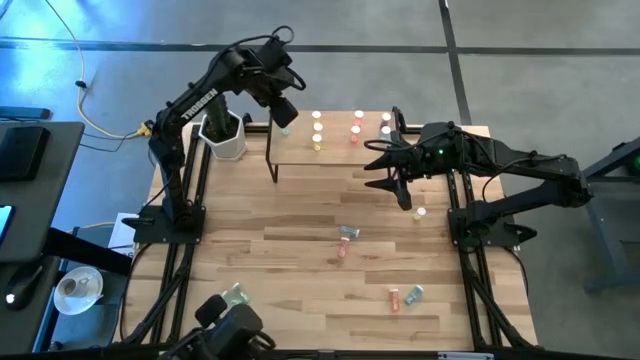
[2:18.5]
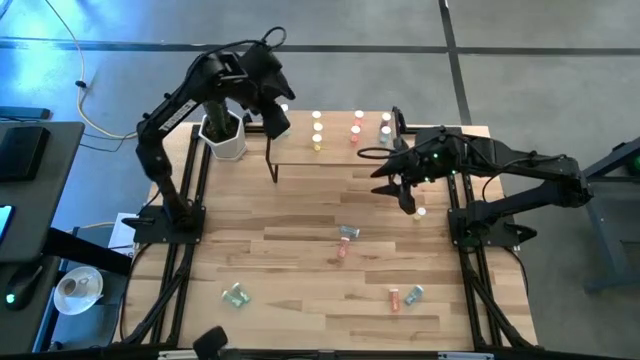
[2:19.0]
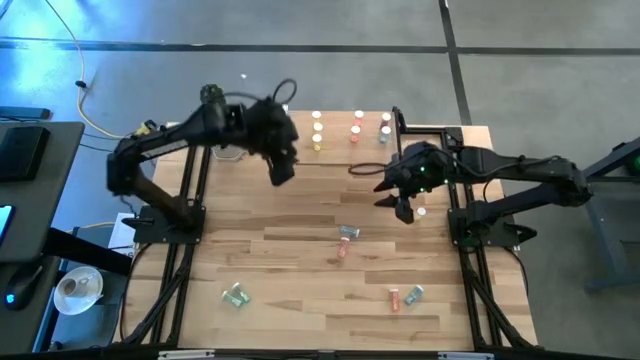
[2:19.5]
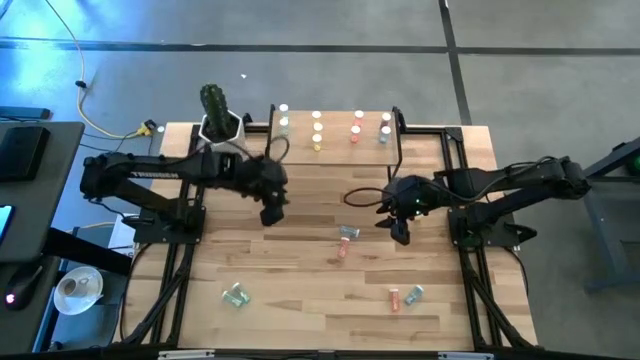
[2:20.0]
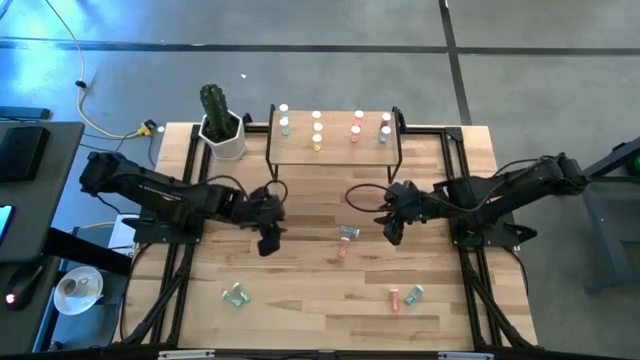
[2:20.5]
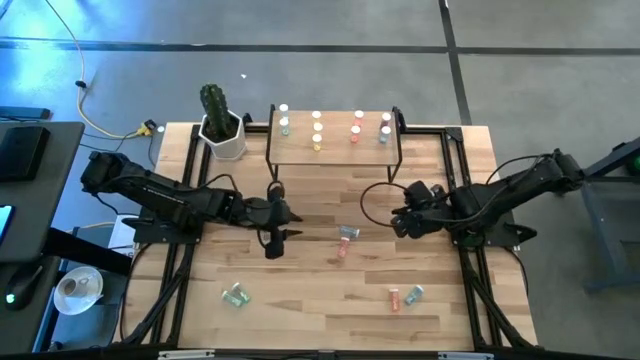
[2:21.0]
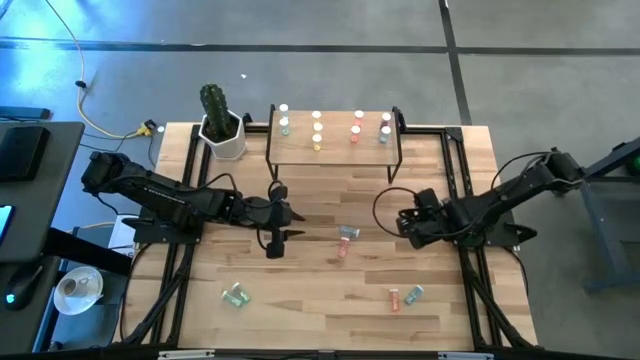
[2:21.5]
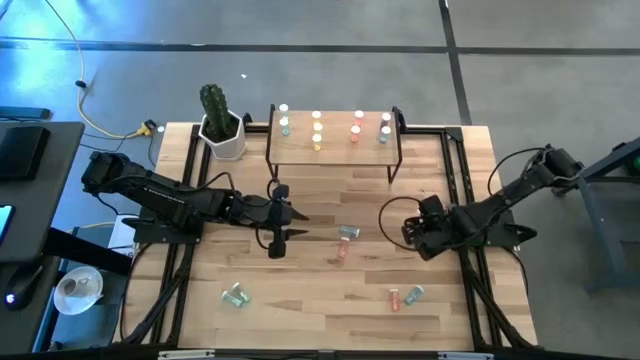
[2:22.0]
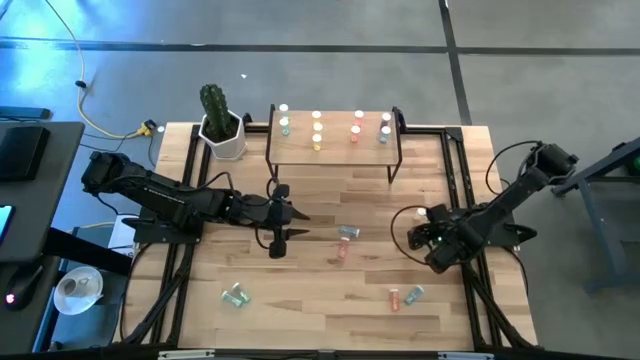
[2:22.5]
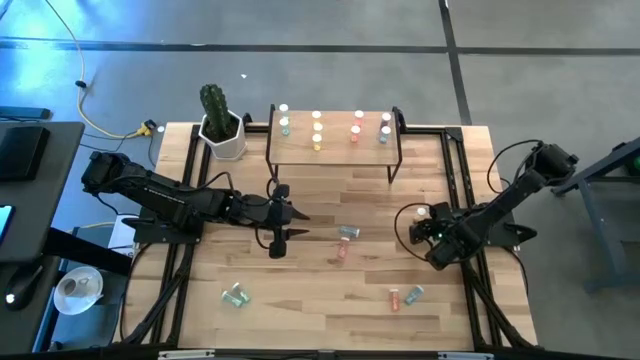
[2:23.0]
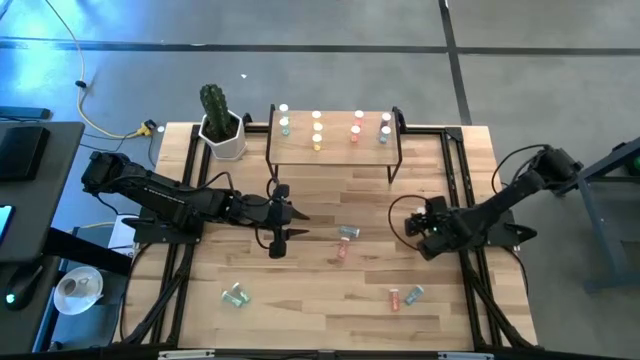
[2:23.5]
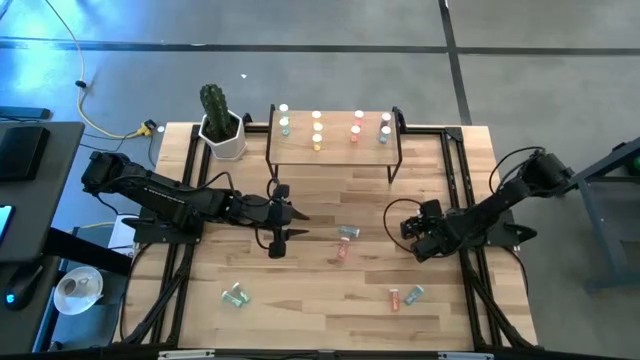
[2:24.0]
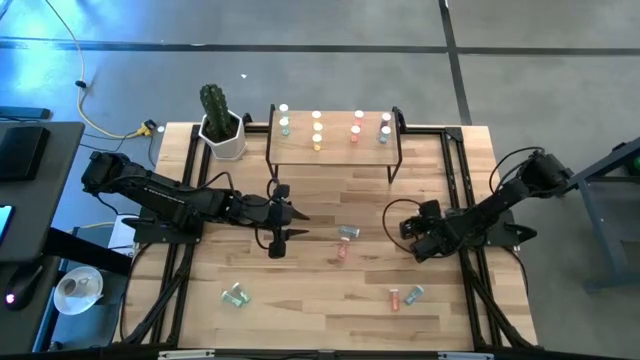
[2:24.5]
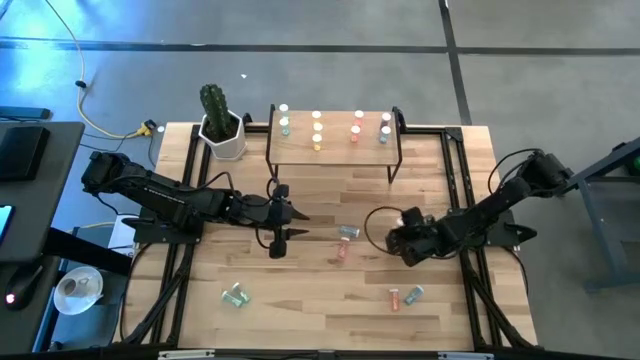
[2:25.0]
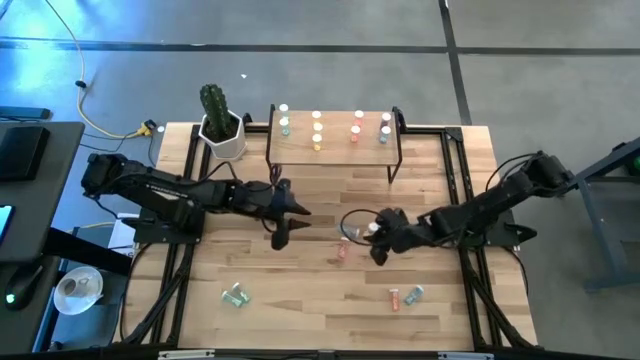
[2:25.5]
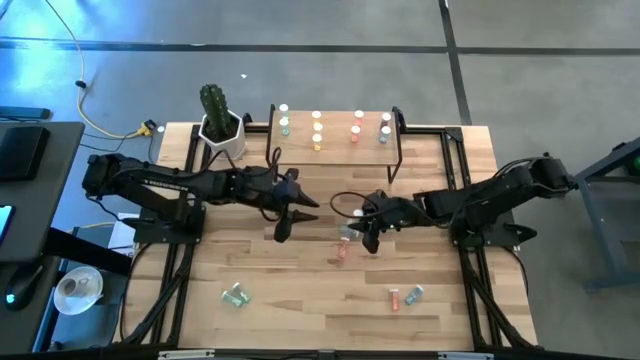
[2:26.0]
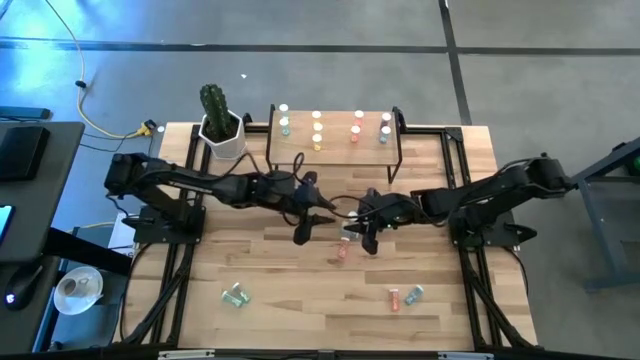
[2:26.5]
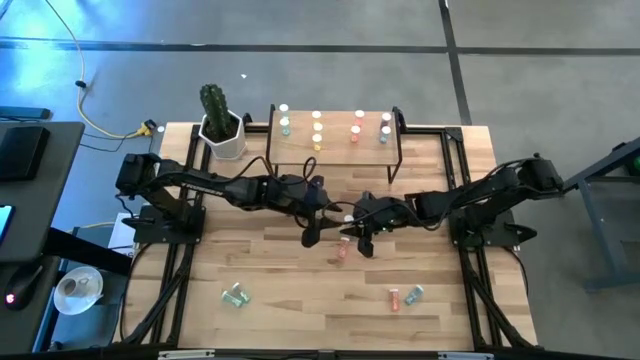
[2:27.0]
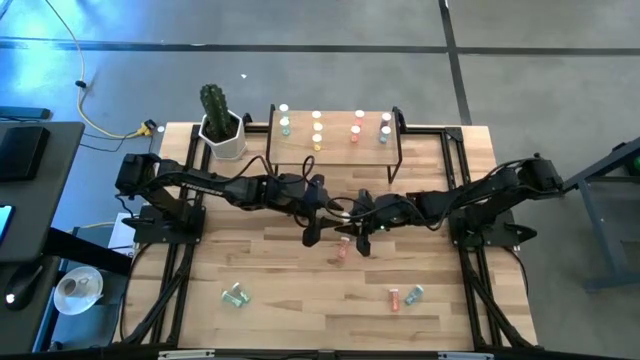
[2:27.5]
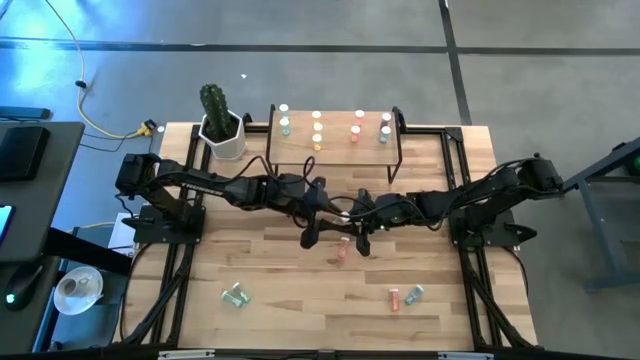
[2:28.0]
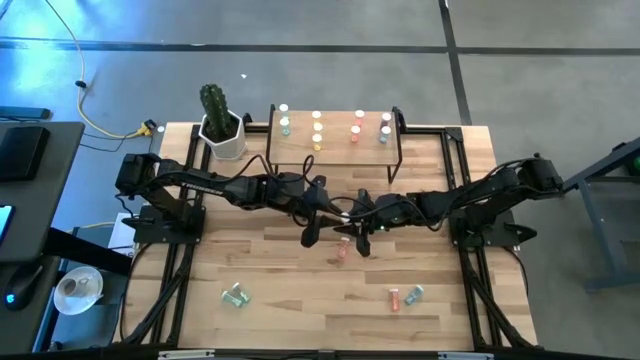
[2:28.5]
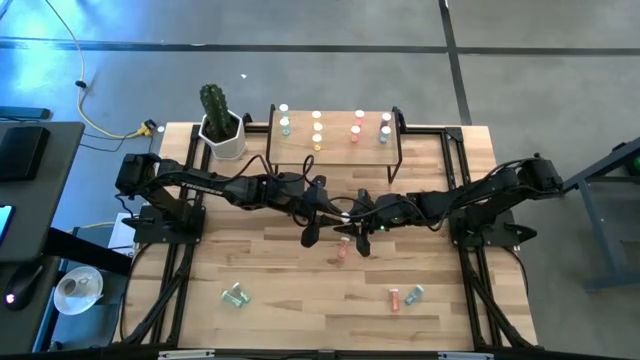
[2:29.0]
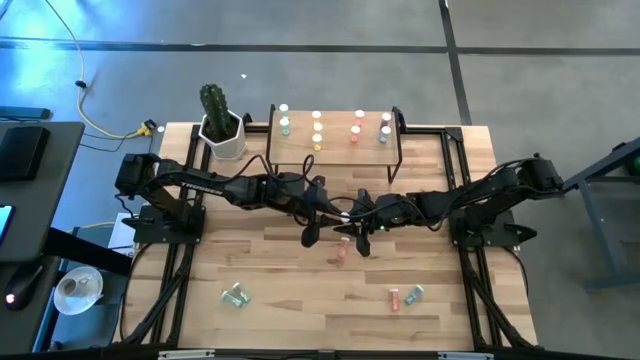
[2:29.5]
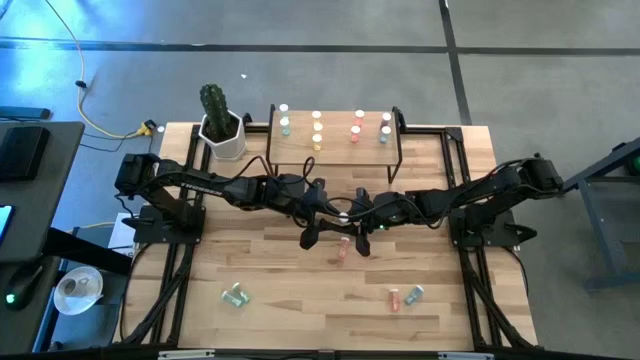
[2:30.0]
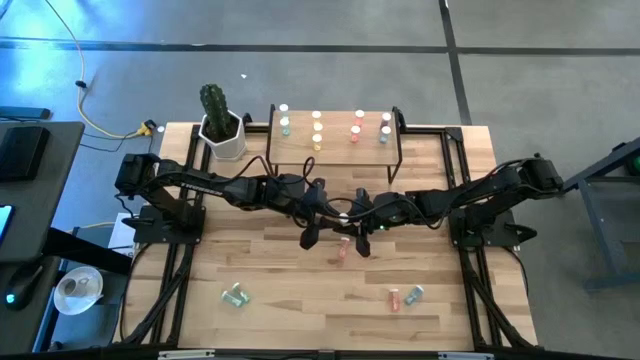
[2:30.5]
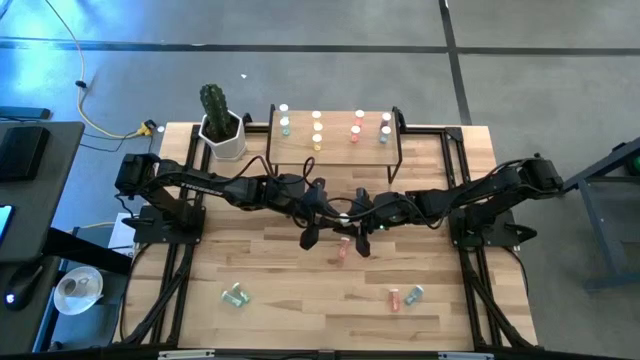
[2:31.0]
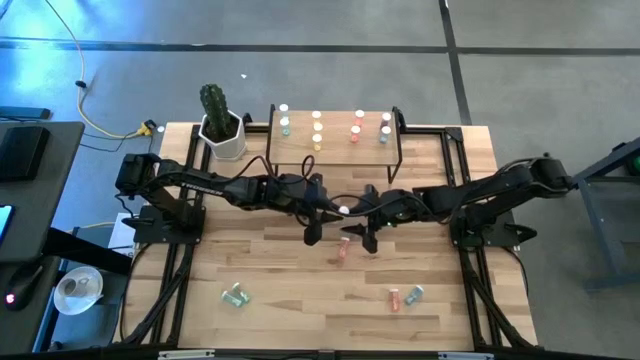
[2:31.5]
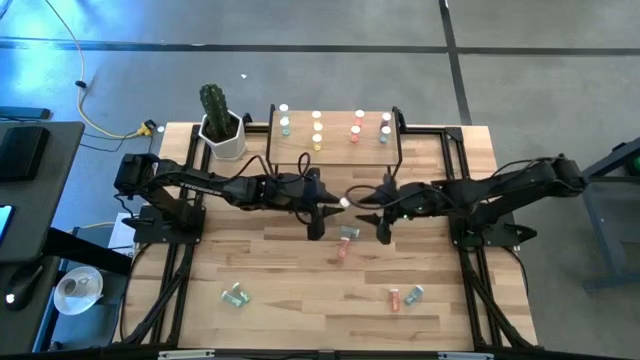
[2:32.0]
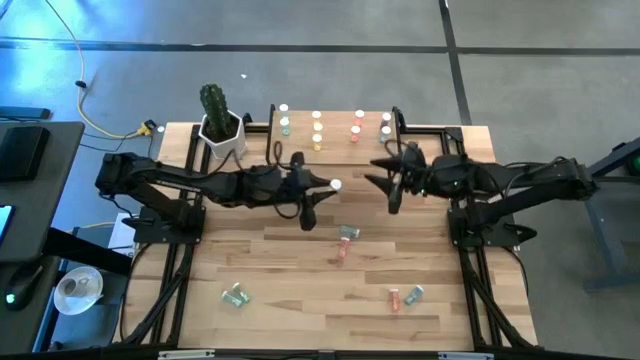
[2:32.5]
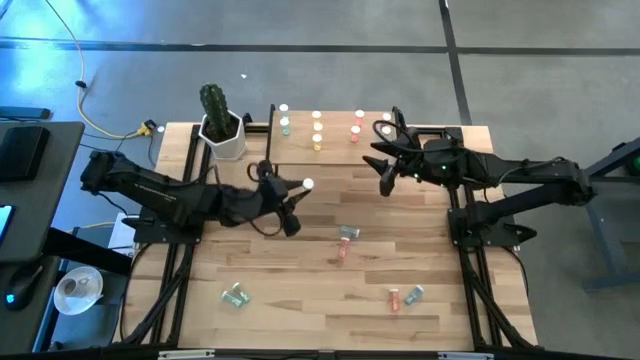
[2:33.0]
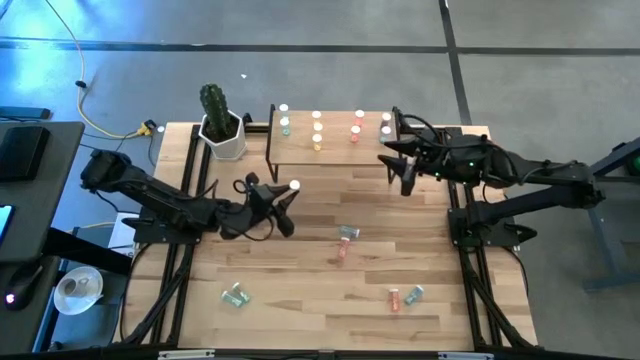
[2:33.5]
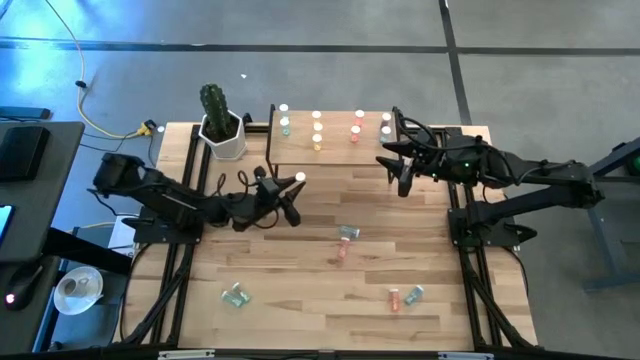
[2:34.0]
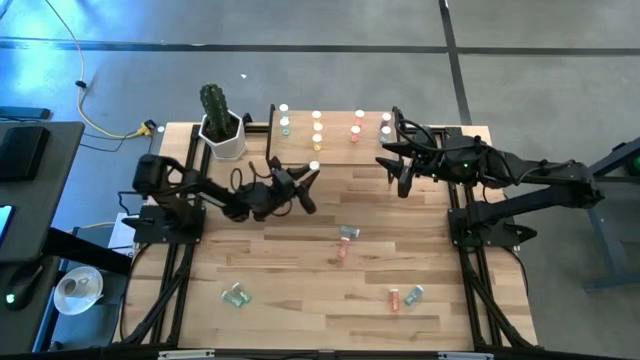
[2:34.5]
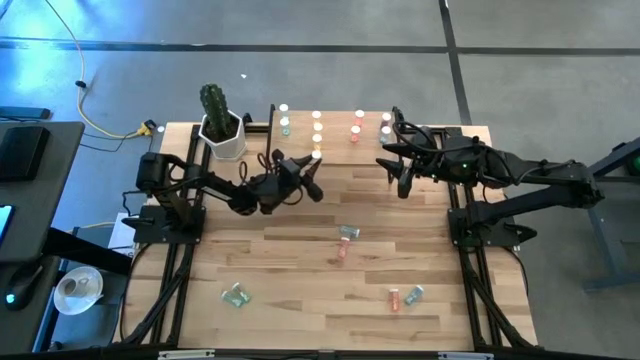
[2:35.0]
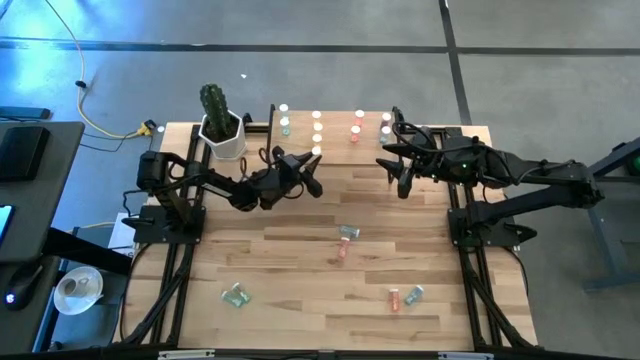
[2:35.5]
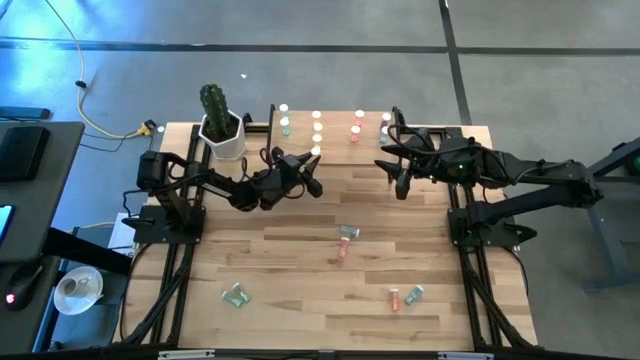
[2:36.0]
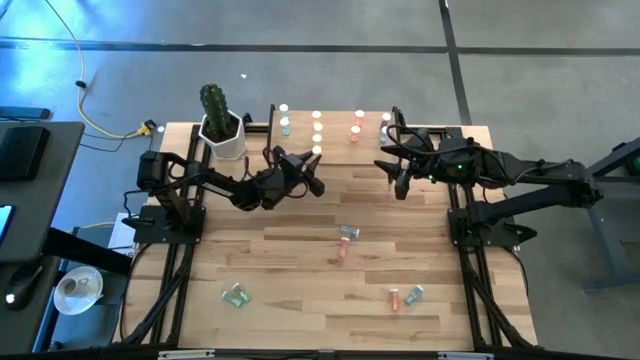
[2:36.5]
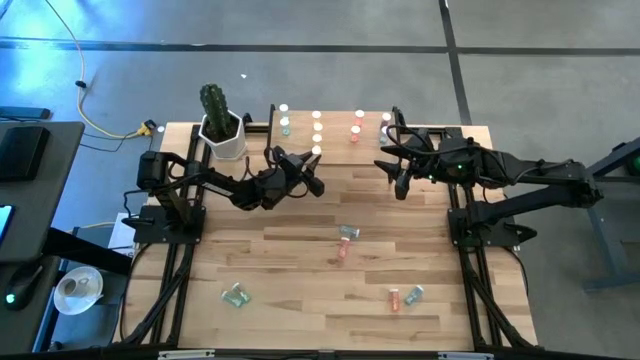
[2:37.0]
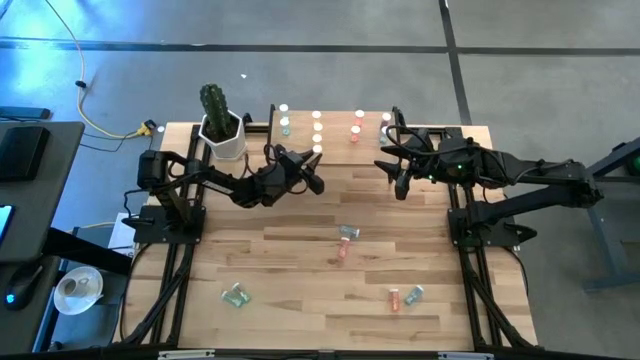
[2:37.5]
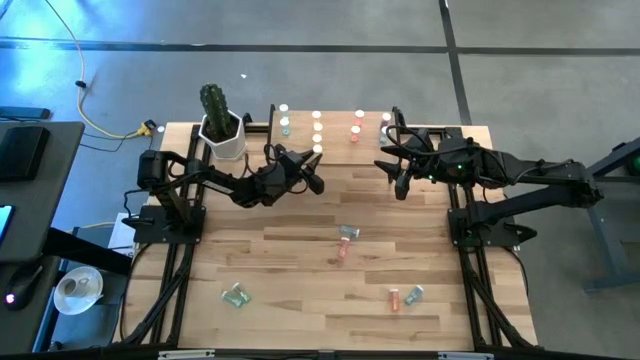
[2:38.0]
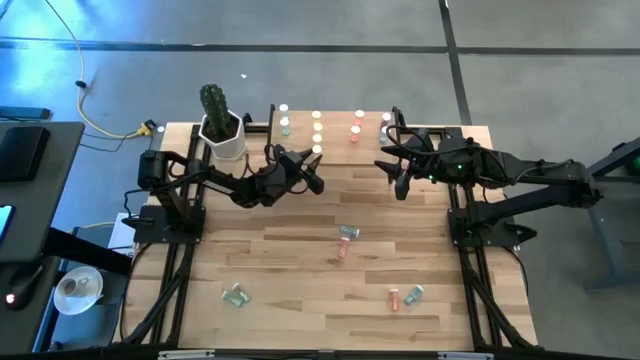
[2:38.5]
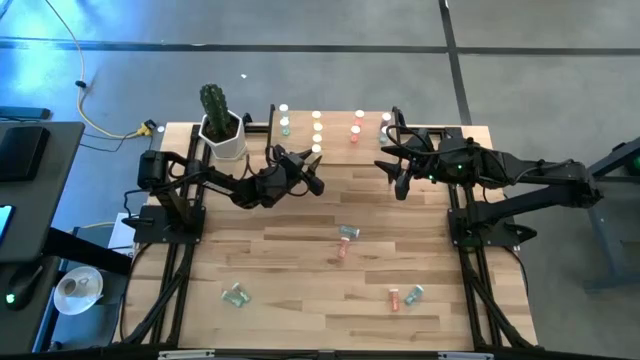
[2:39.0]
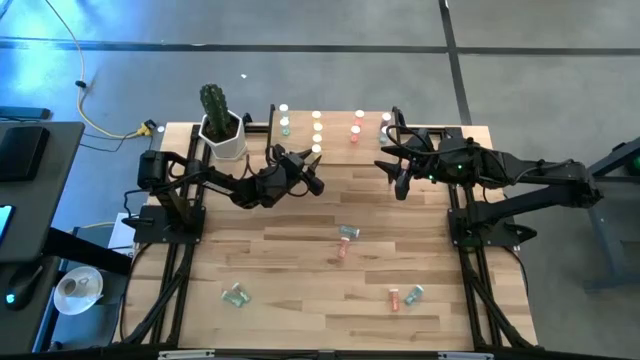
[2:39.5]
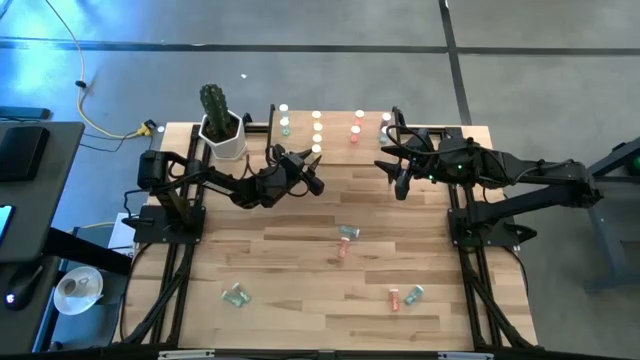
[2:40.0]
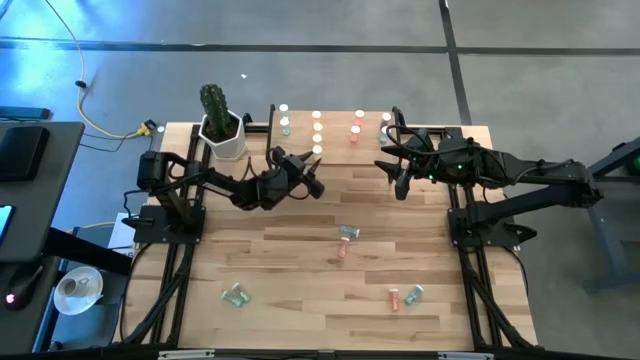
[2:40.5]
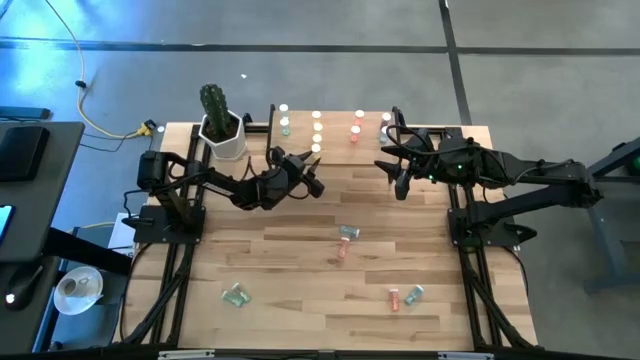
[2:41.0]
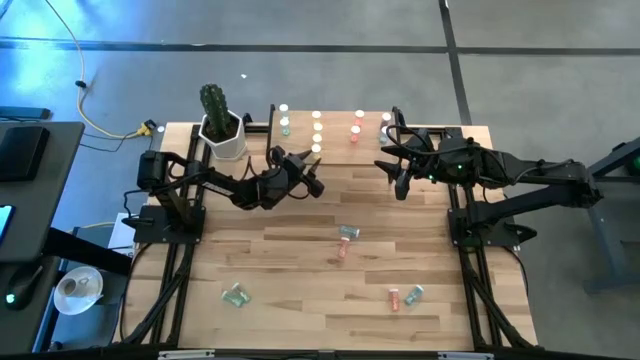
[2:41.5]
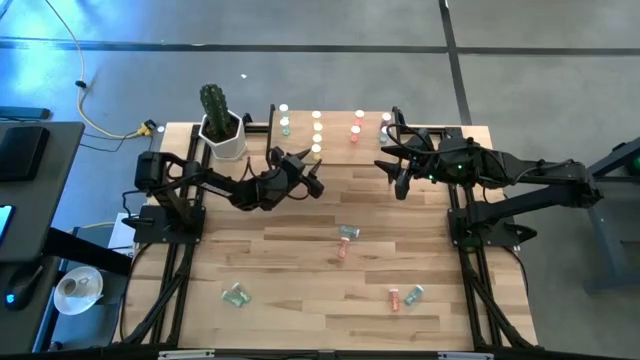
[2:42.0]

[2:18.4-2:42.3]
Task: Pick and place medicine bottles onto shelf by color
Put the yellow pill bottle on the shelf aligned with the other yellow pill bottle
